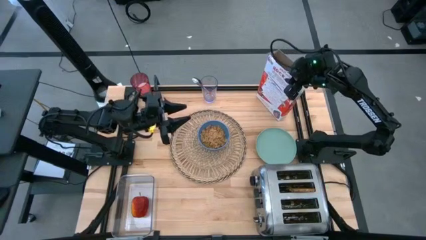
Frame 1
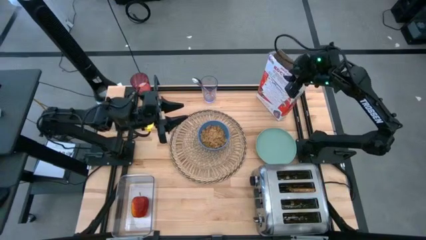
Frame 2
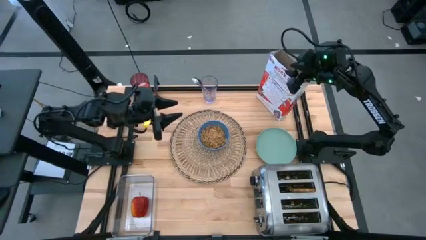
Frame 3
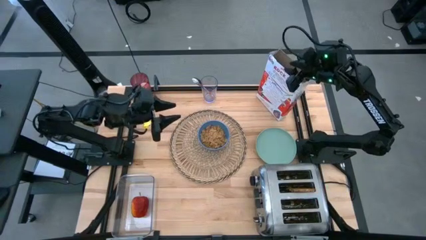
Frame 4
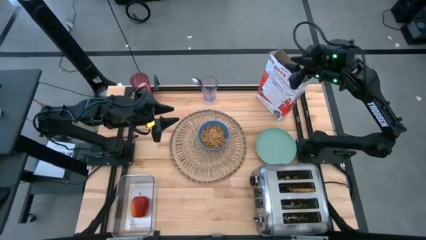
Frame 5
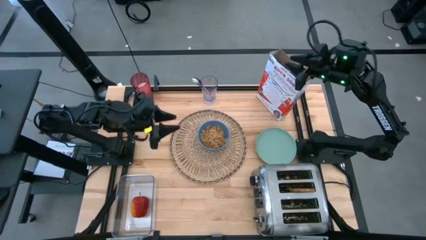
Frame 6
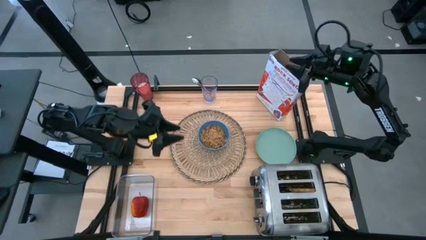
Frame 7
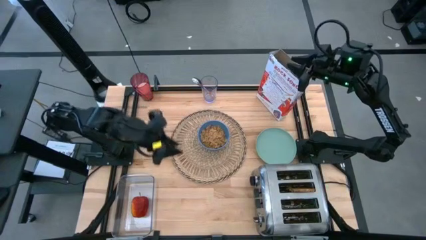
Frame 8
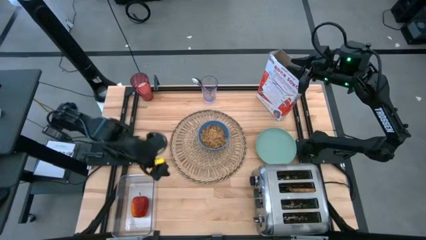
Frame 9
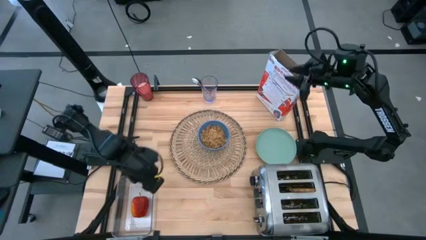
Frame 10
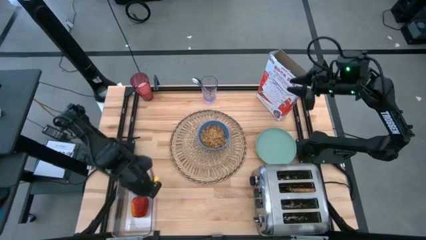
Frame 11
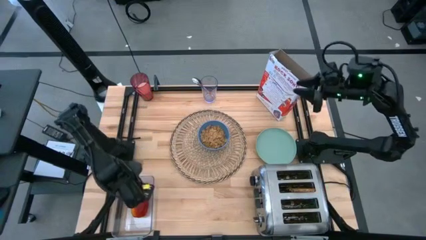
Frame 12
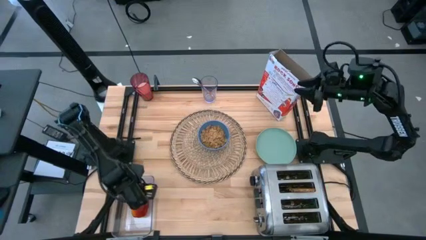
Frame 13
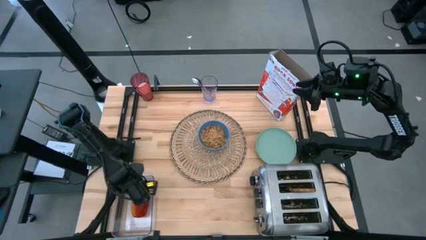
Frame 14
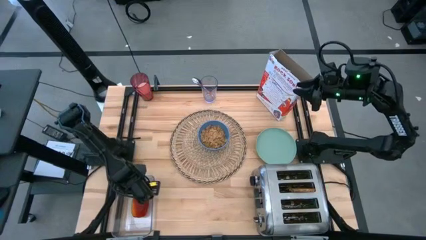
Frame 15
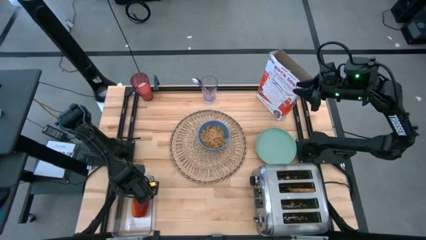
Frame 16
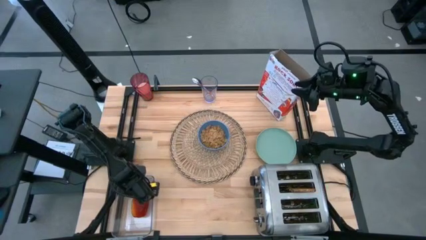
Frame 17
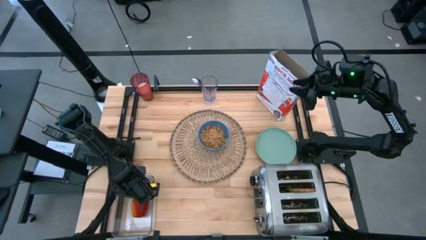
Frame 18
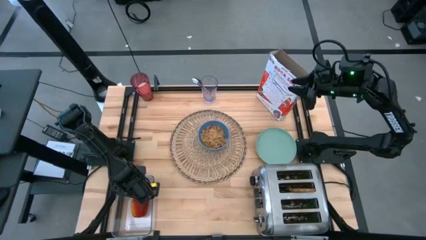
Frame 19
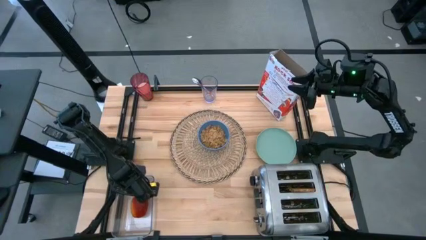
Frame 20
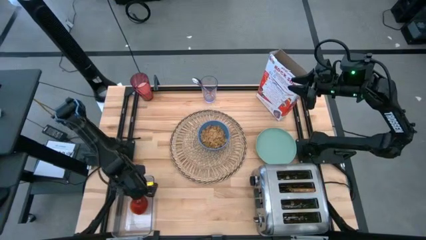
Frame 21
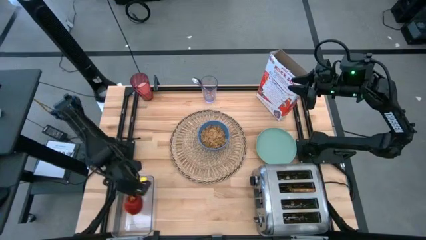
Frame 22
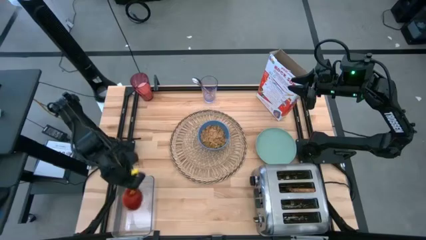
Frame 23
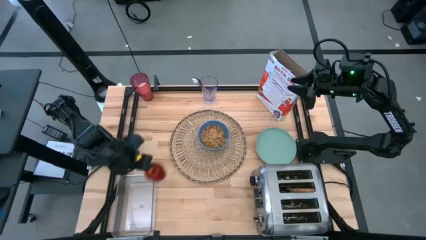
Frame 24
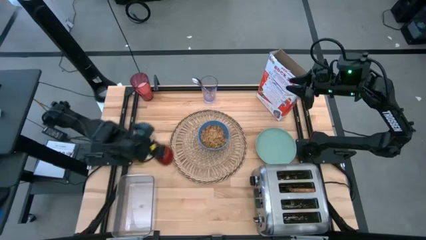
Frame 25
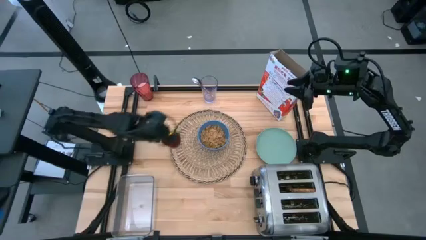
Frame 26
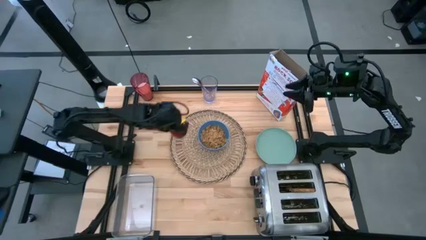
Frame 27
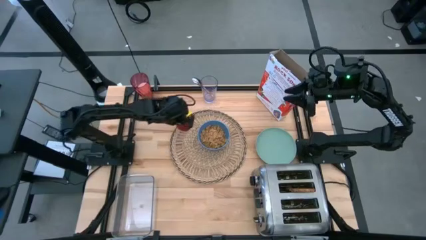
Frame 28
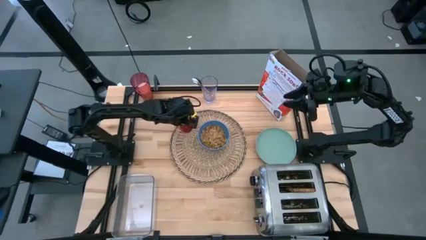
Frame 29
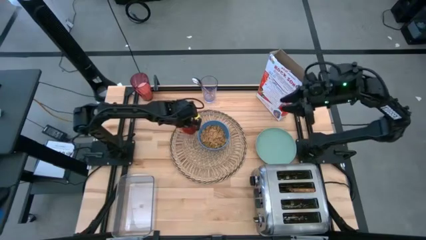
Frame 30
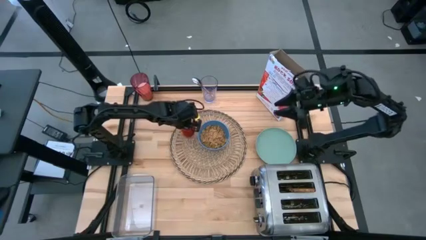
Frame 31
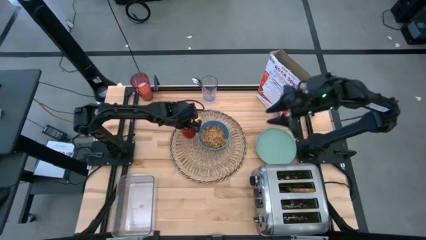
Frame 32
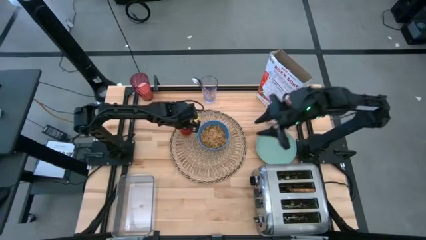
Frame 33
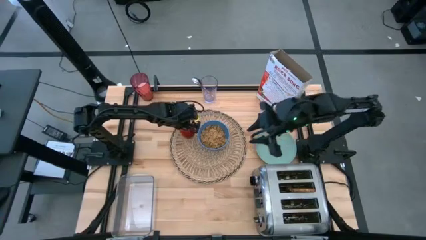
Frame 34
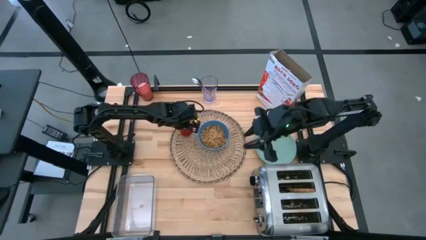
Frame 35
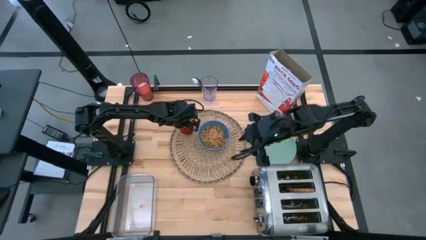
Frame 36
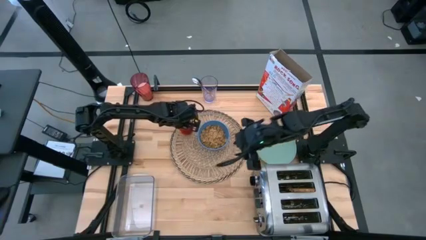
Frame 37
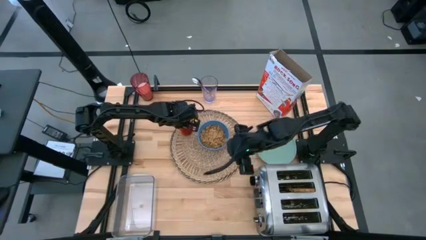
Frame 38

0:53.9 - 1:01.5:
Task: Arrange a breakfast setting
Put the red apple on the brown table mat

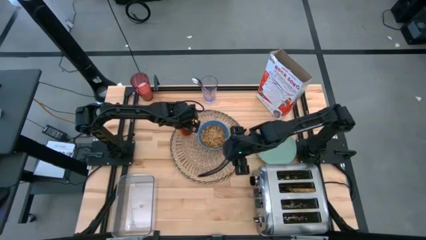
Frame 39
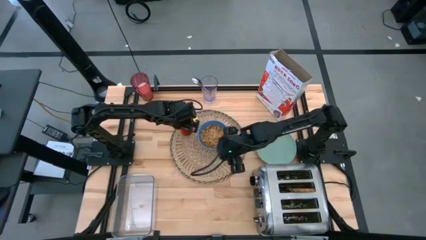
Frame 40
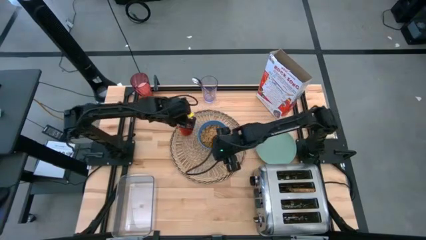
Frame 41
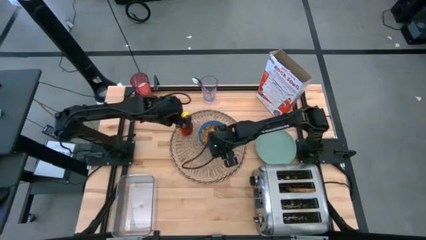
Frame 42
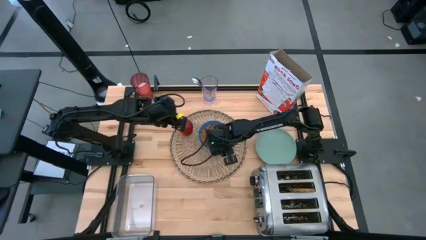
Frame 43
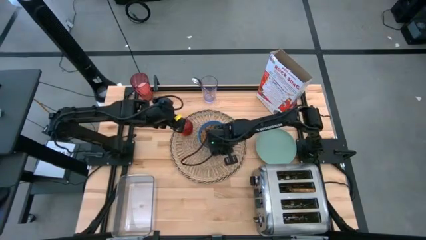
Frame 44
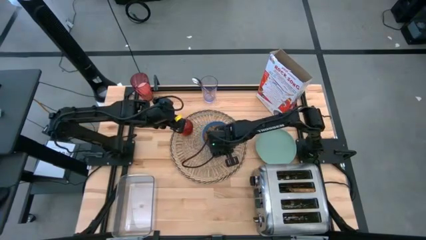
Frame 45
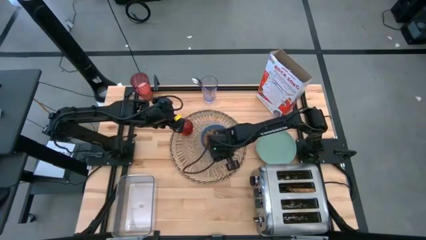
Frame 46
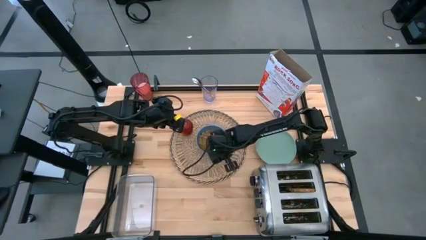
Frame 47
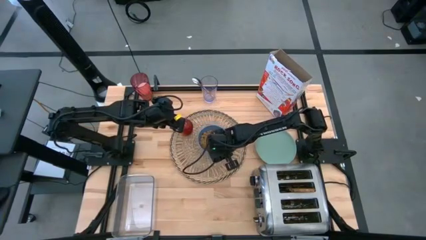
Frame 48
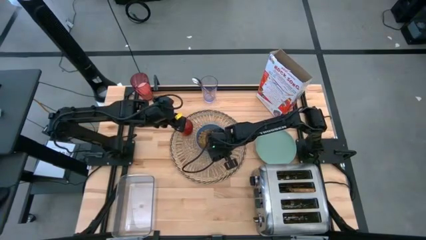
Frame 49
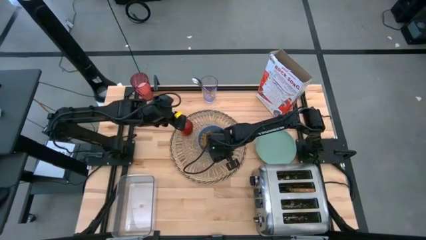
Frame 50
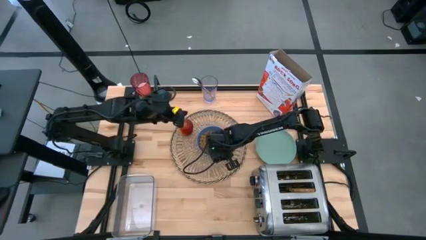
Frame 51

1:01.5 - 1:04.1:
Adjust the blue bowl on the brown table mat

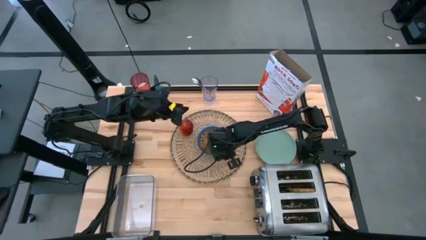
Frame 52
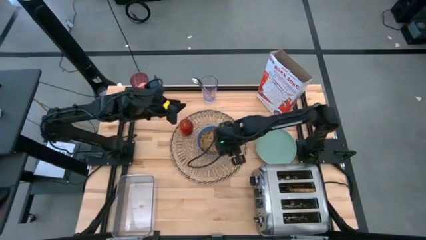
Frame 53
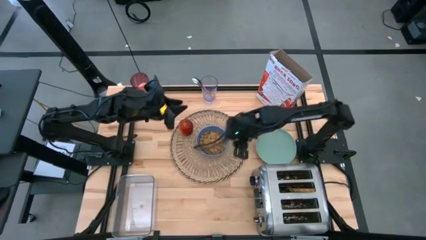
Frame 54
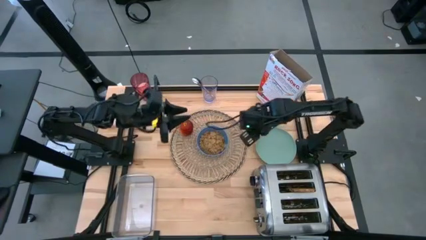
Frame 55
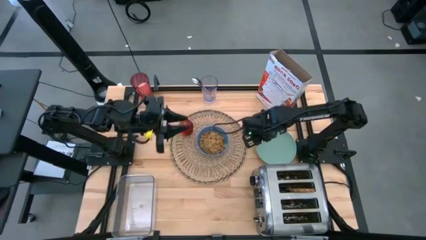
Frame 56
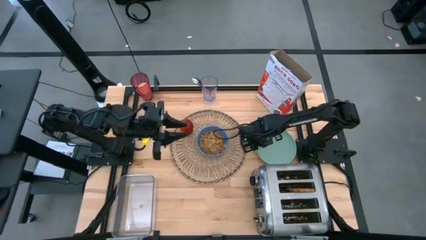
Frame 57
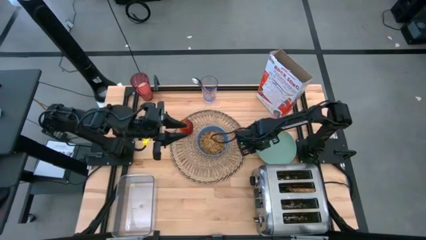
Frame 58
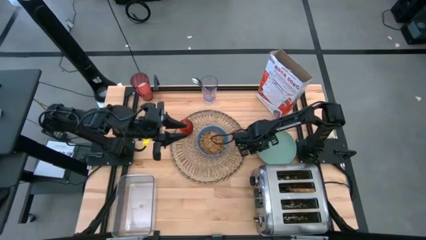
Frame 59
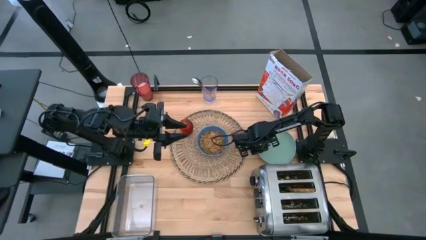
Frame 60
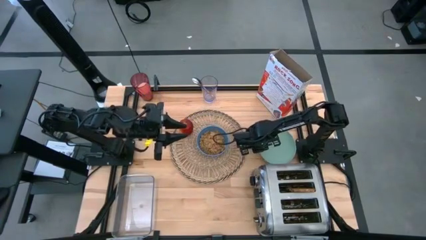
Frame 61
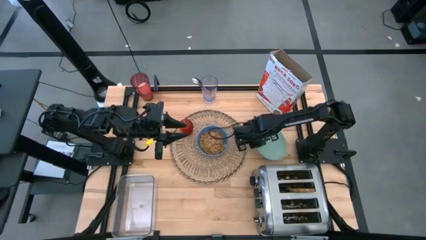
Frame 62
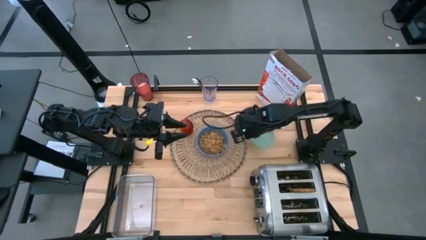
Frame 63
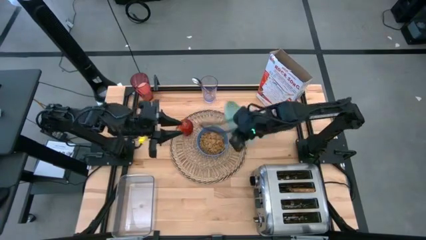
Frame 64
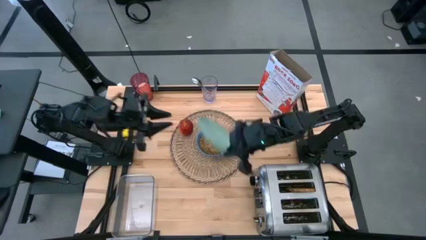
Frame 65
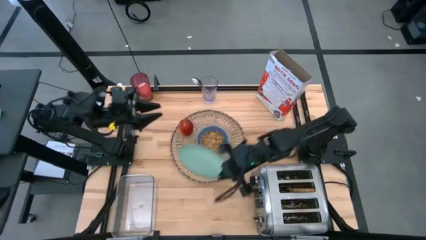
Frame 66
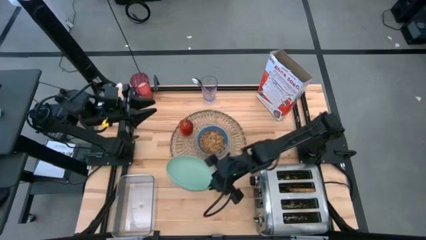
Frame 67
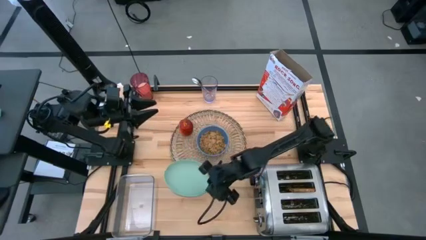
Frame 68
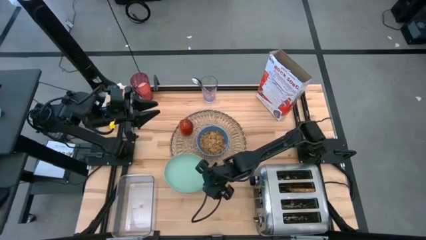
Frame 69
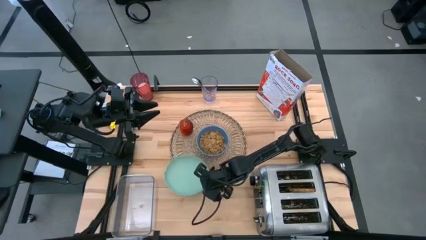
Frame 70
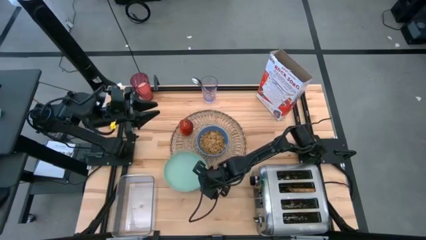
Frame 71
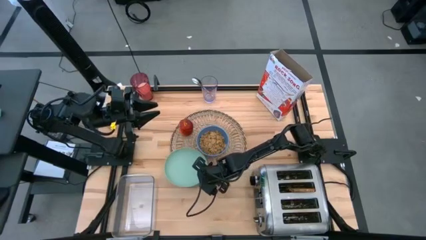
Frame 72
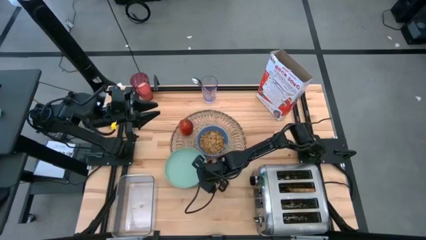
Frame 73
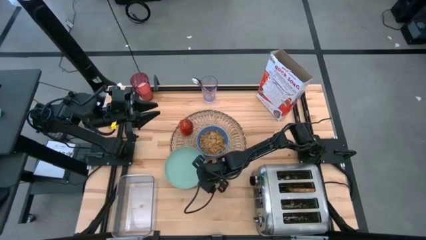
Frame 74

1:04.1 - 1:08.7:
Put the green plate on the brown table mat

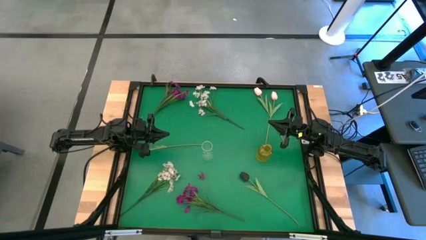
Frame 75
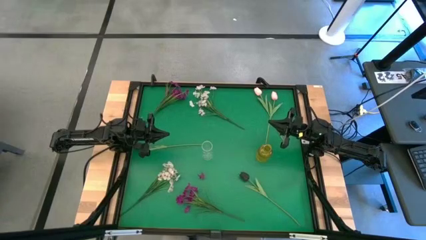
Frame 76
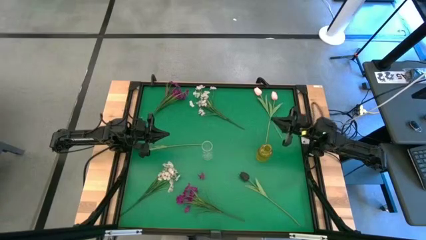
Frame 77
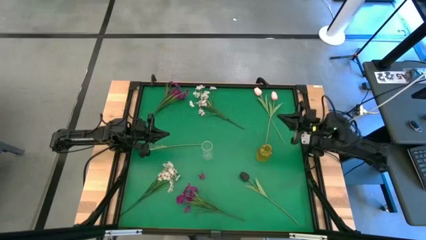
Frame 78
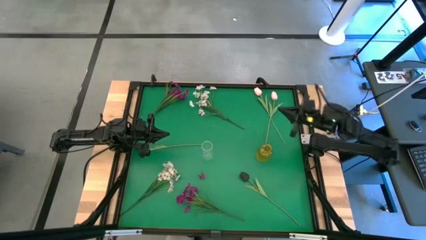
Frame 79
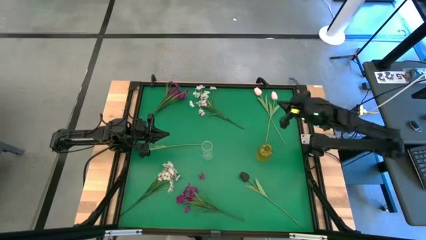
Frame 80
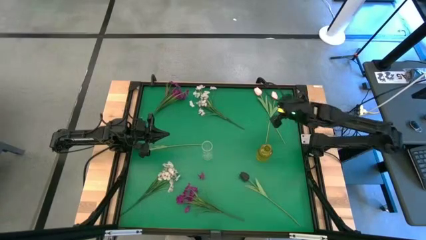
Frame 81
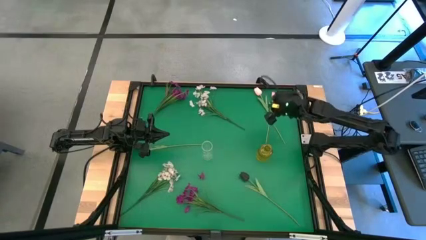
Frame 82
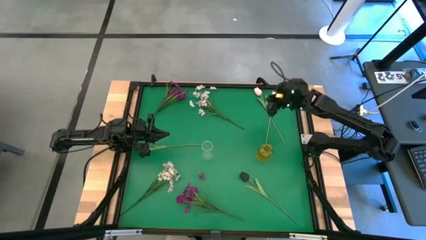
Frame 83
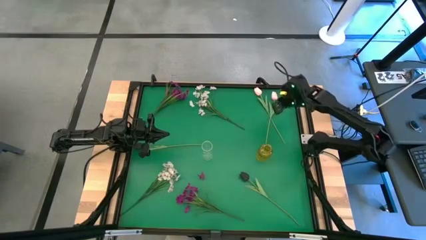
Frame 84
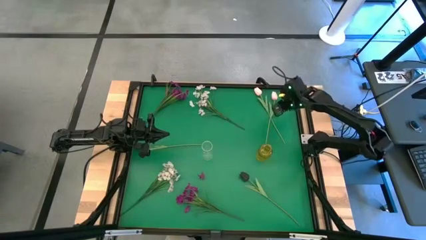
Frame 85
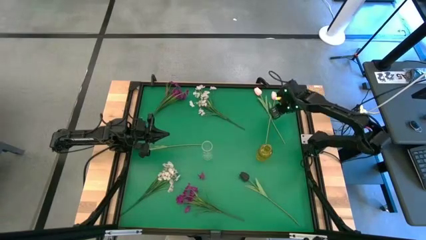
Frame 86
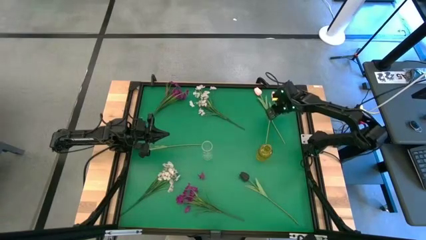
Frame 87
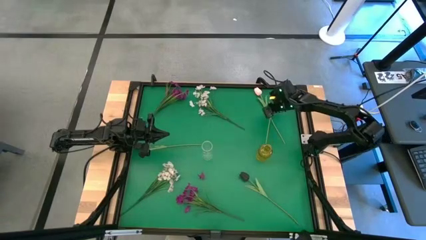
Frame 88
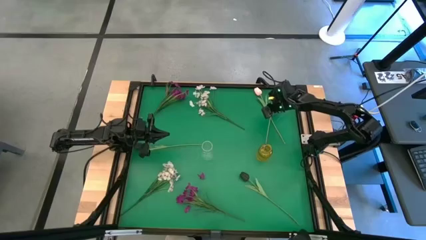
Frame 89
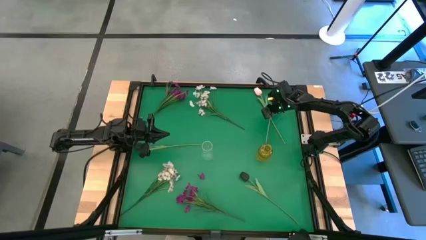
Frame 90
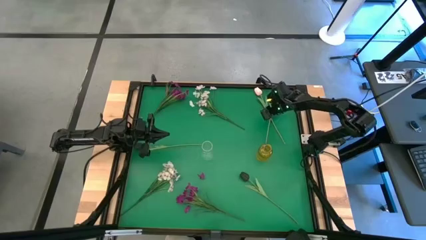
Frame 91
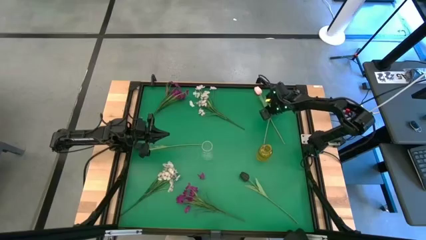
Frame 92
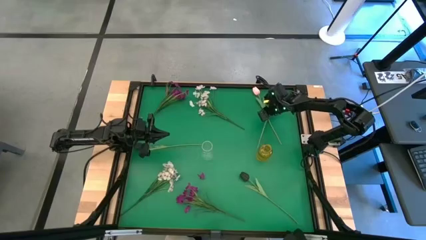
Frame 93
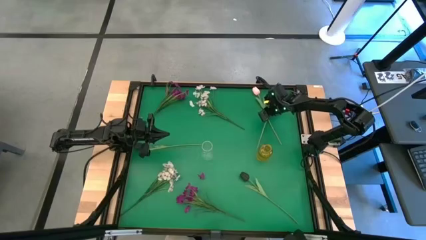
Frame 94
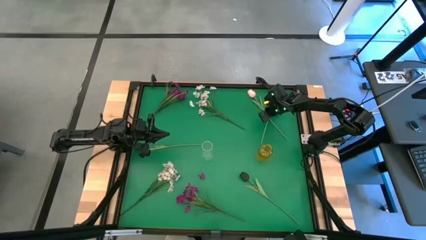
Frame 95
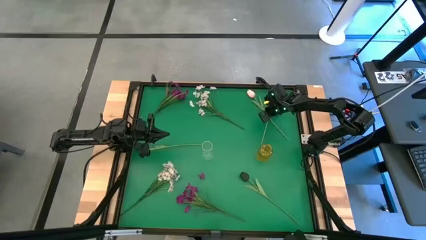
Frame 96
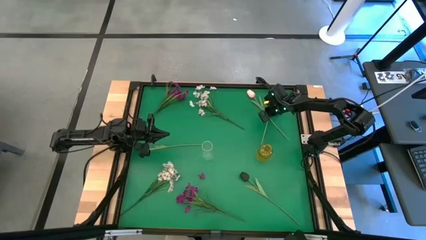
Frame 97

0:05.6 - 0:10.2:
Task: Sort flowers into vase by color
Put the left pink tulip into the yellow vase
